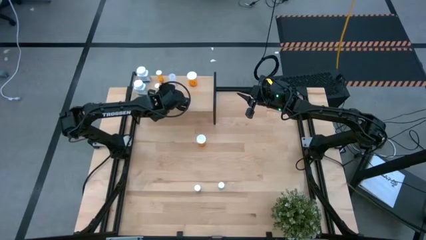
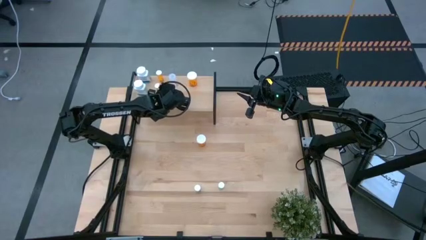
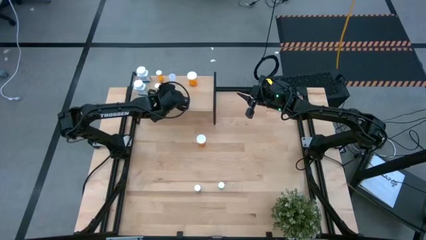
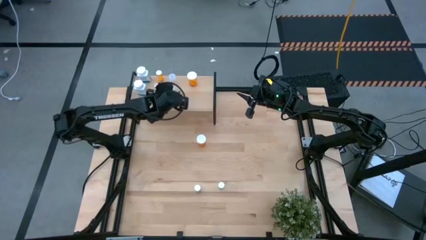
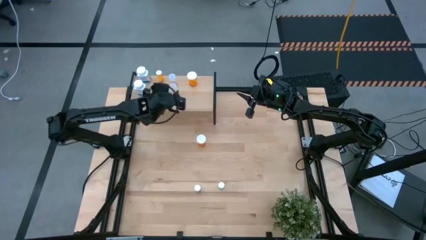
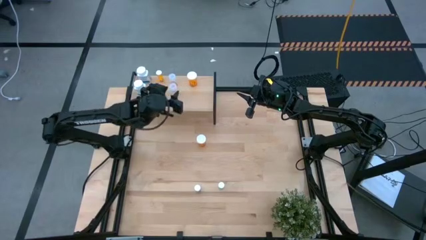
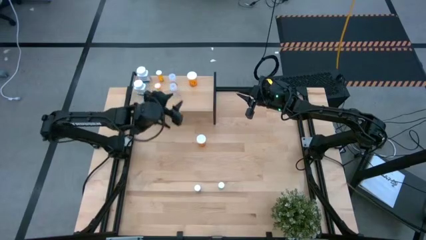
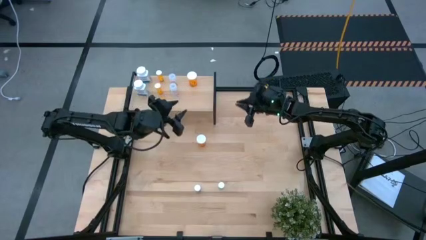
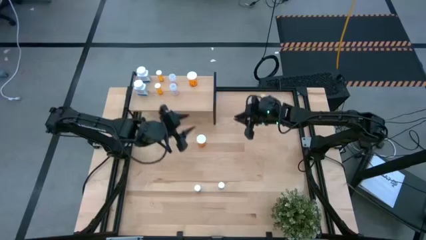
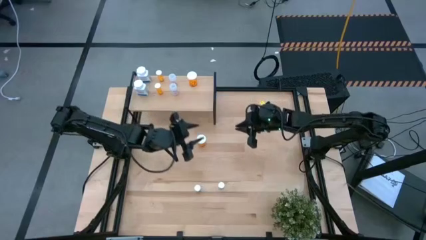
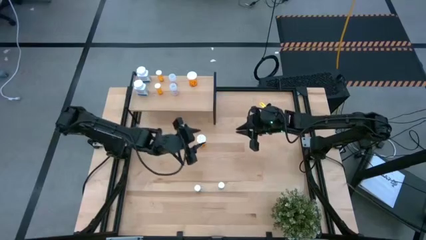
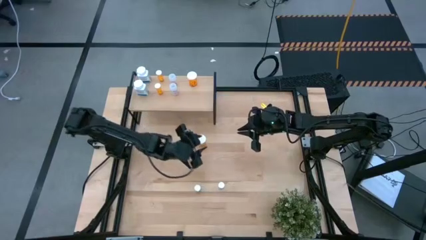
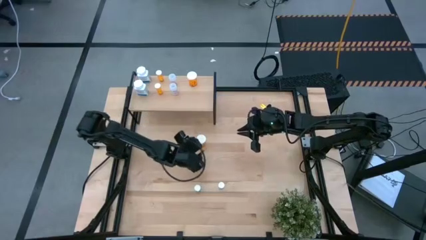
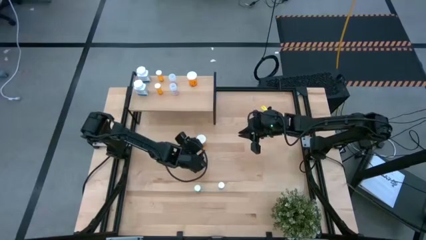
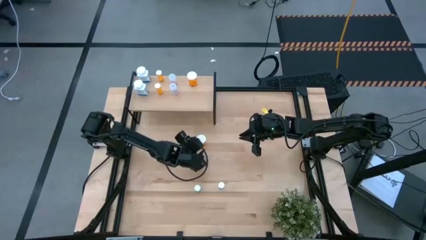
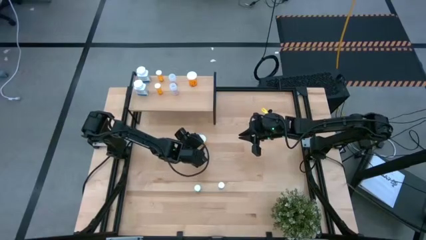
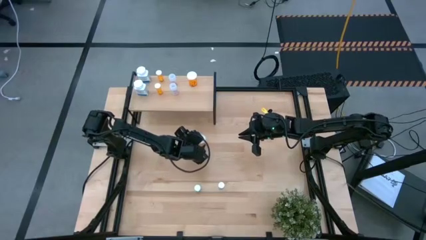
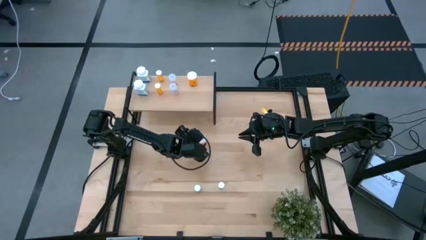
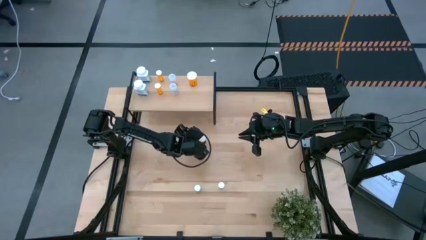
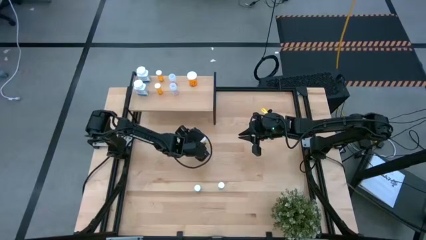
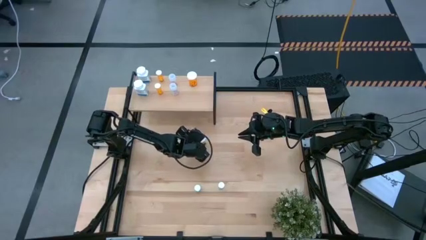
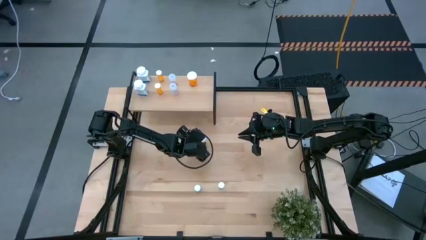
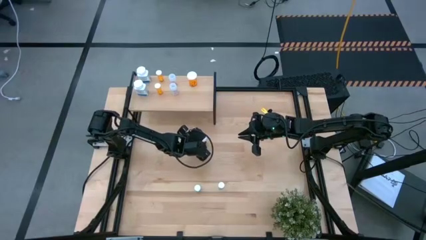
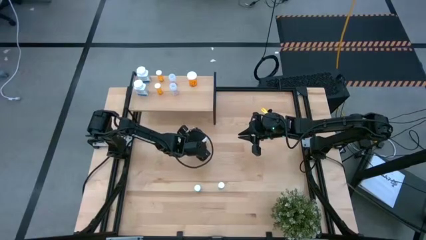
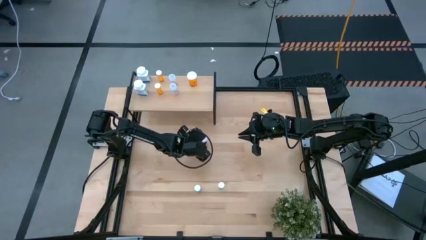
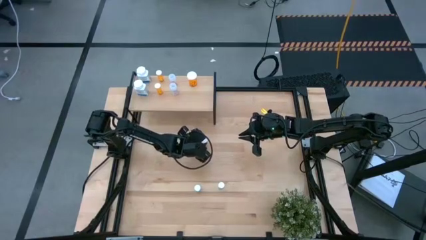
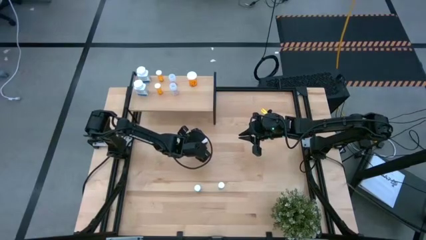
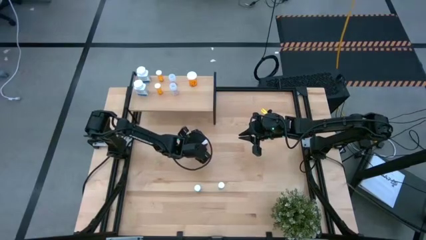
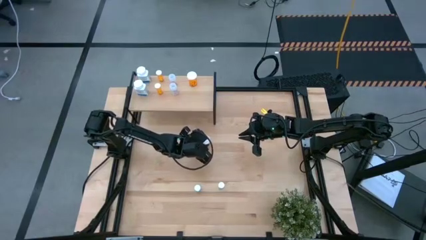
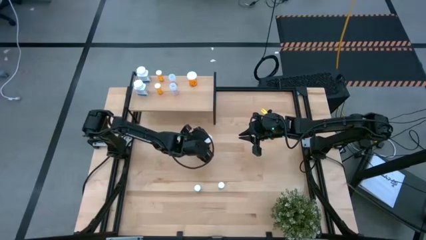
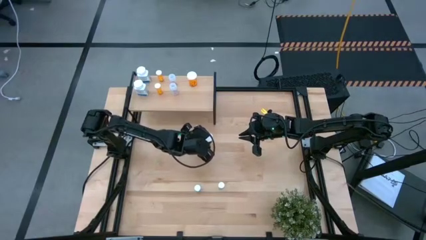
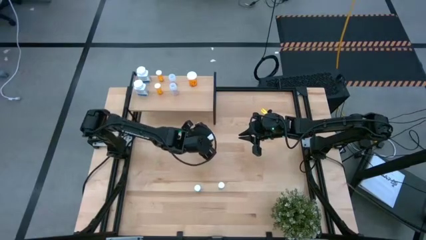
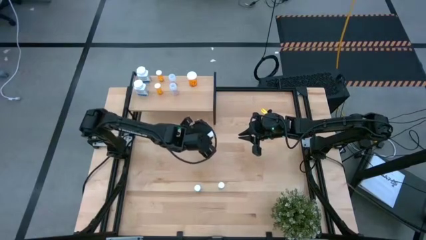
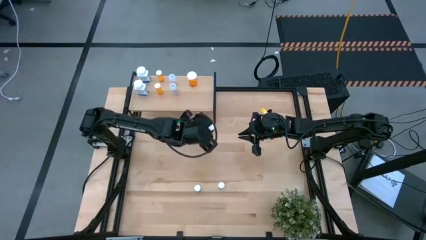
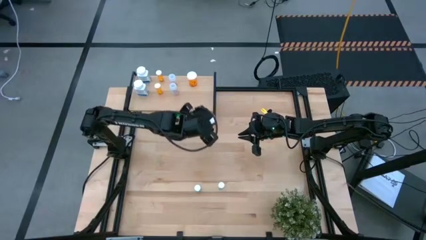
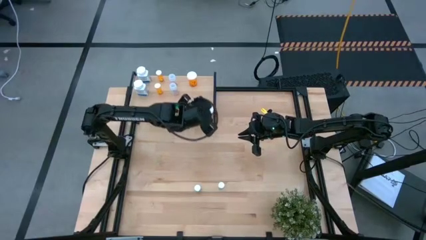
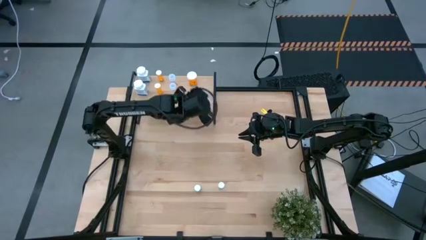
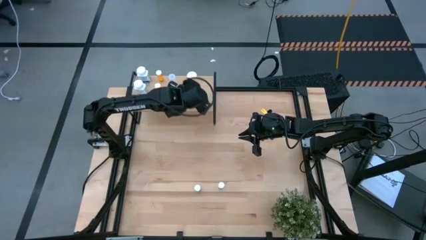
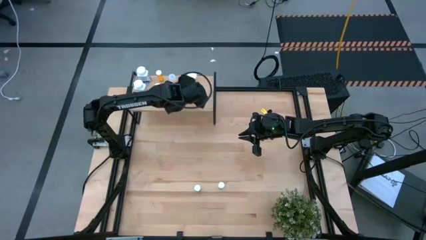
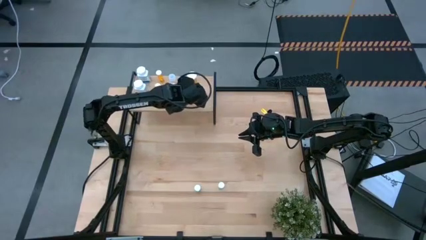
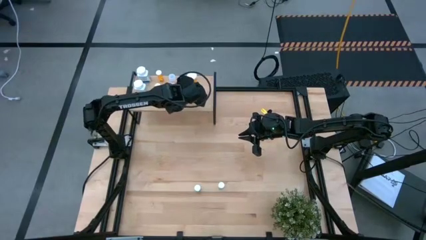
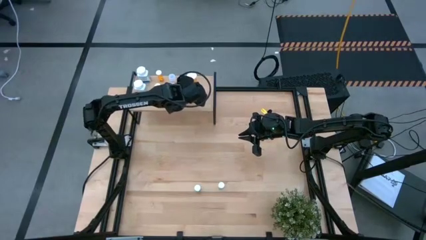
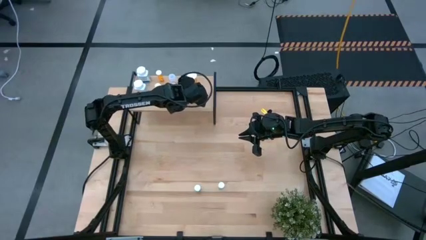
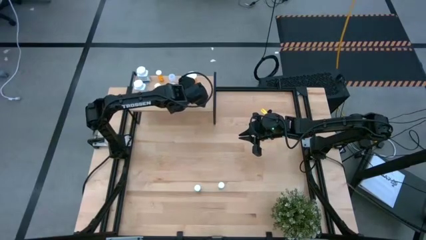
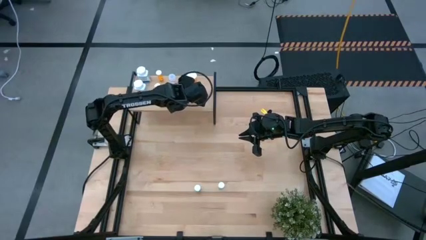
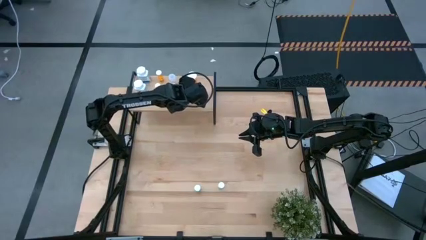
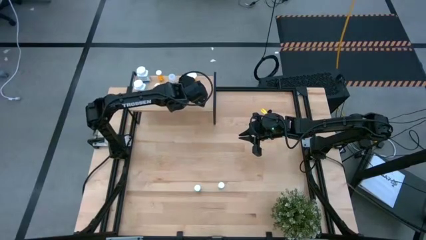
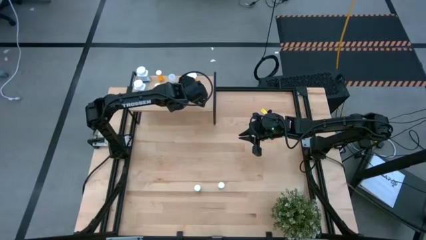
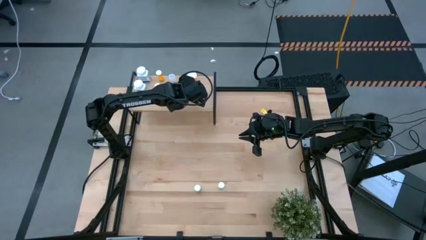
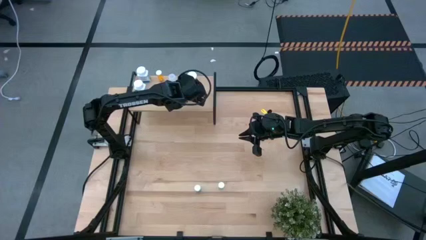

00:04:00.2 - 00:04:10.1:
Task: Pick and place medicine bottles onto shelf by color
Put the large orange pill bottle on the shelf aligned with the other large orange pill bottle

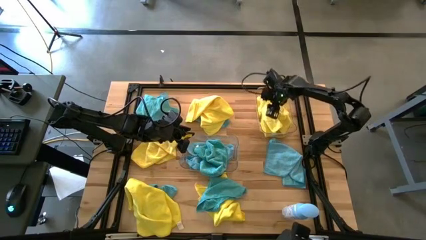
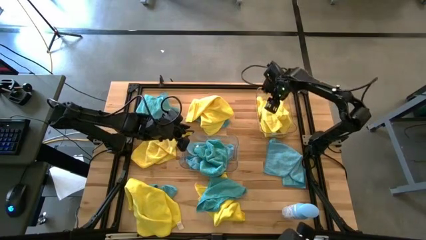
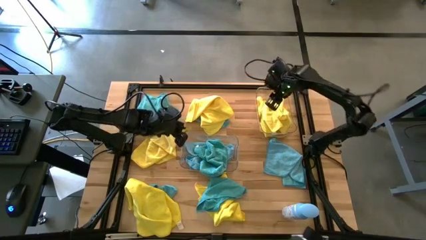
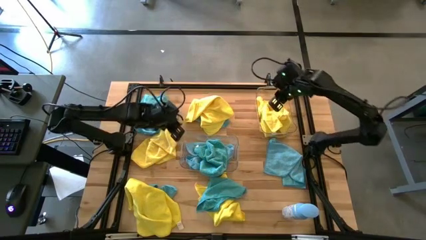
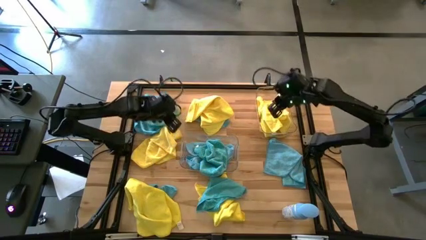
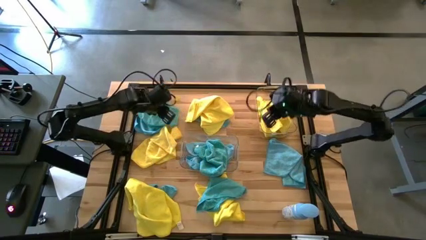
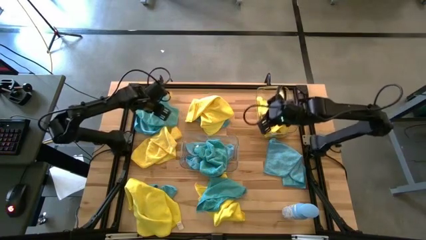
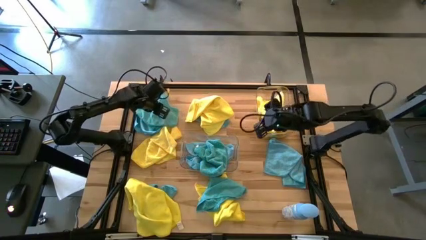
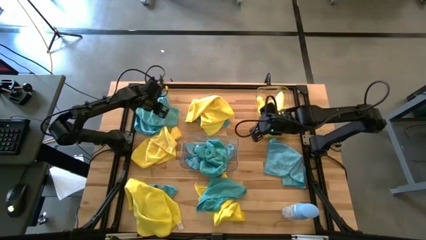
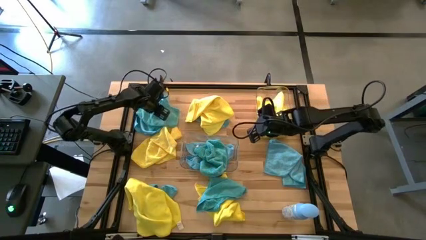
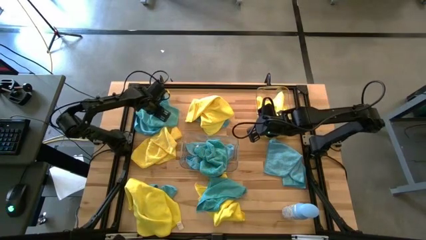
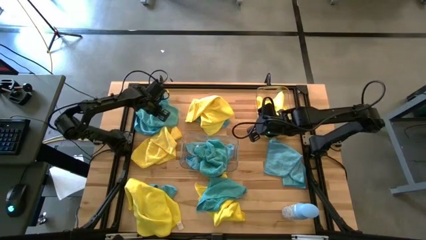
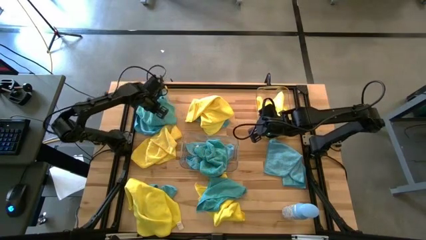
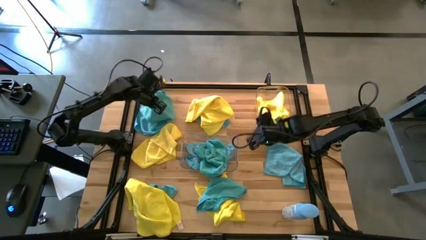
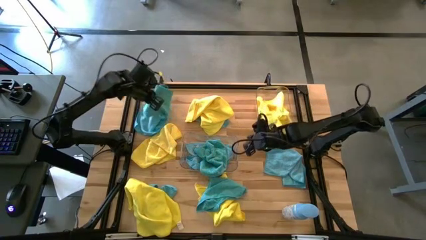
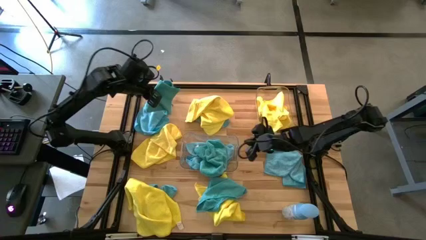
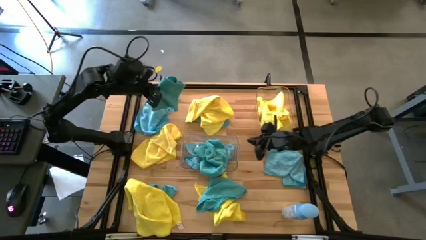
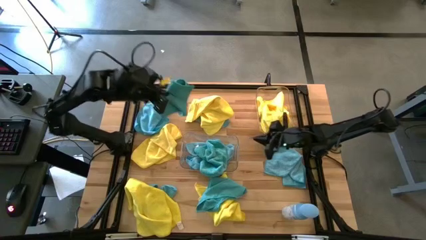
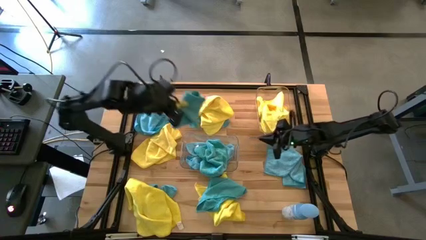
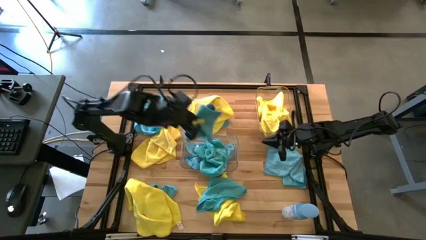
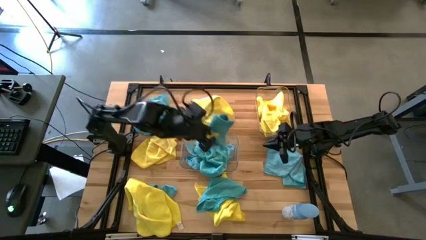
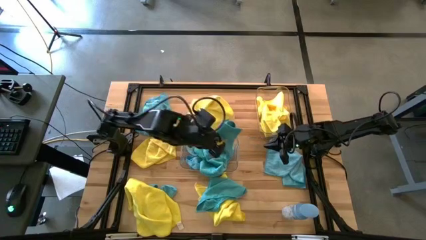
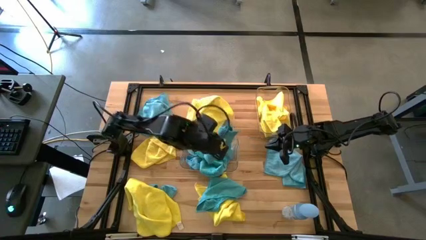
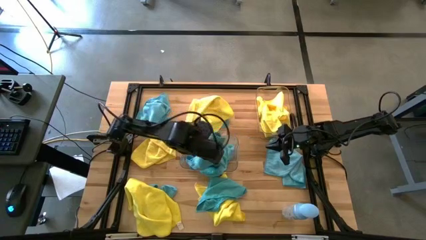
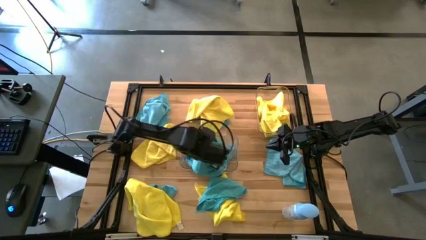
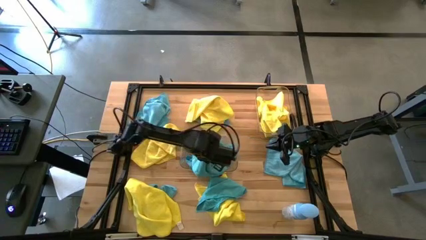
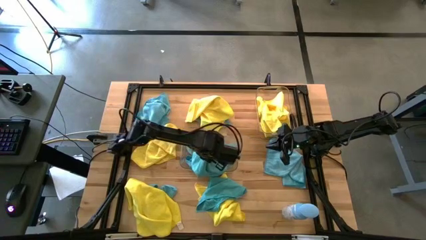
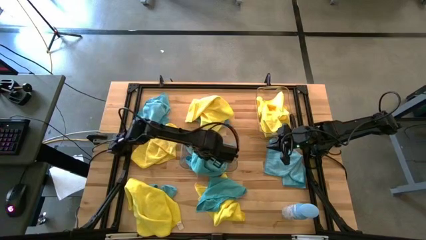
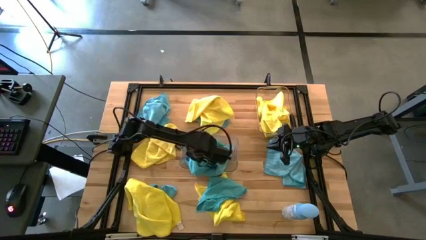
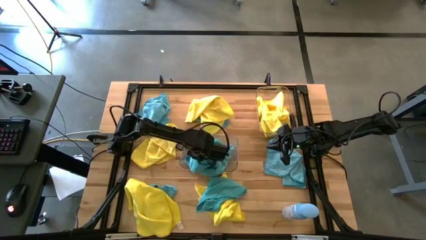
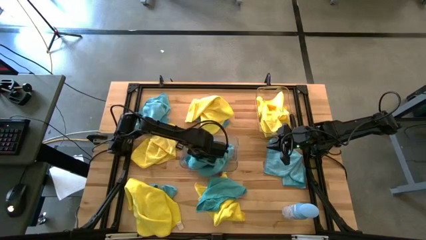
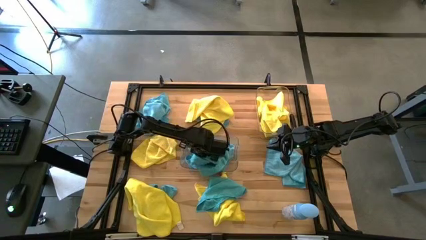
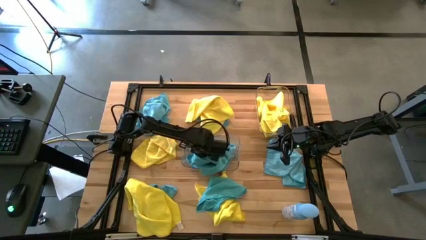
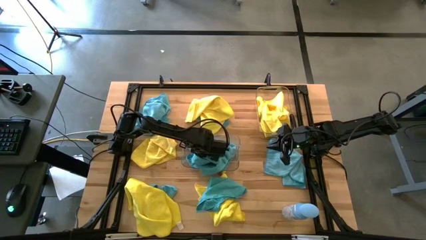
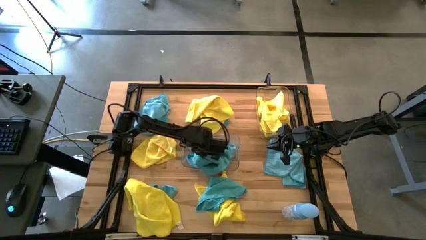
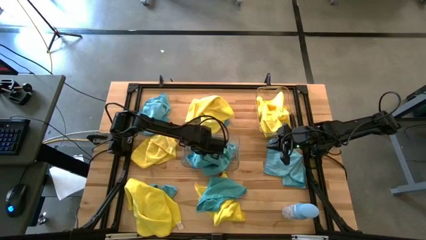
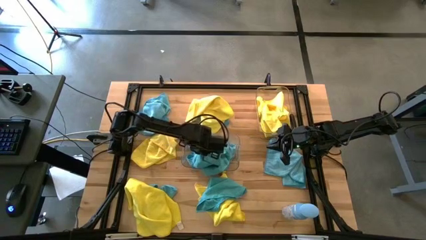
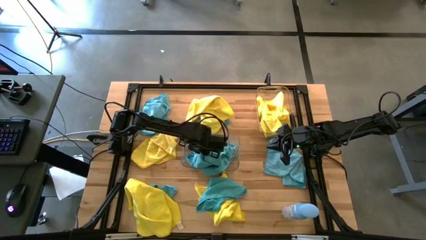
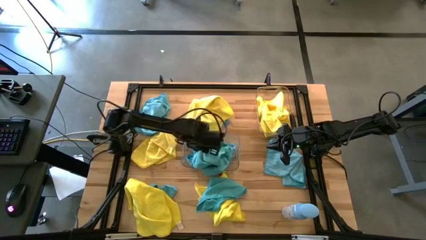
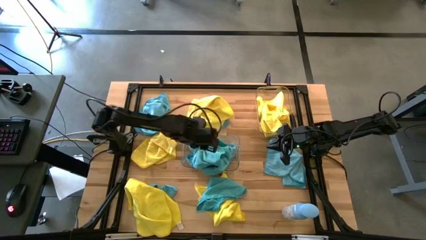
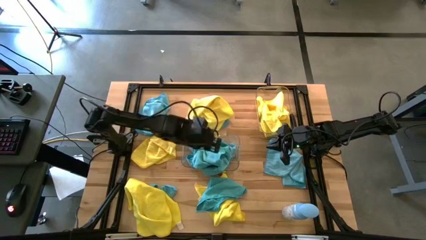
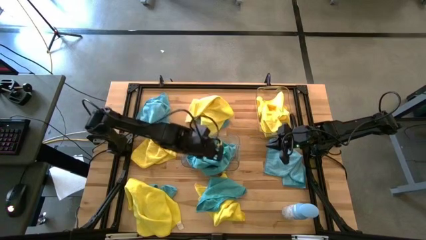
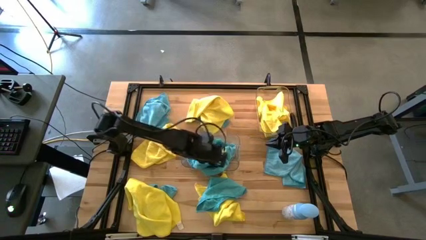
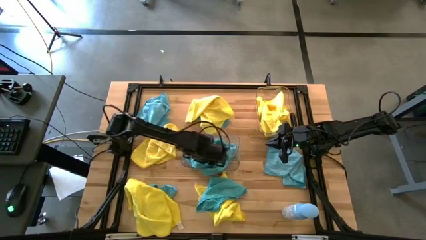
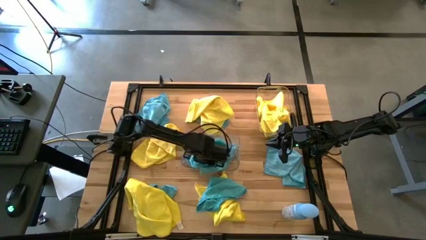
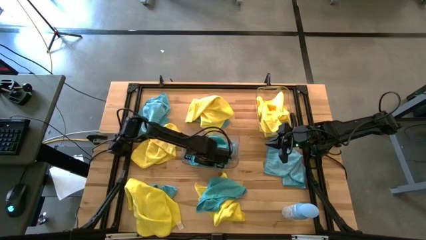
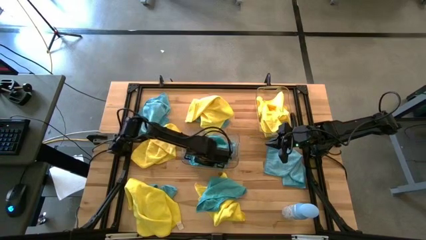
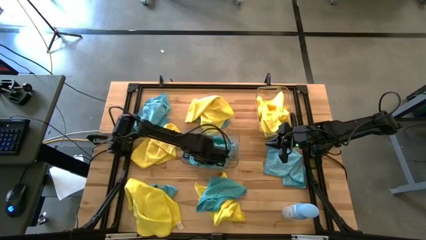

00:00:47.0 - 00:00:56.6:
Task: Sort microfiber towel by color & place in baskets
Put the blue towel into the bottom transparent bin
